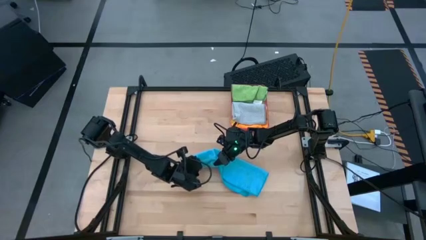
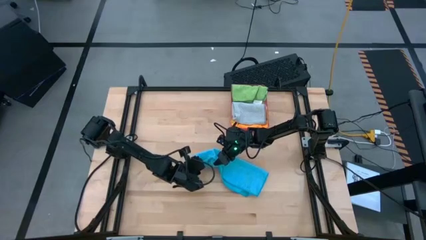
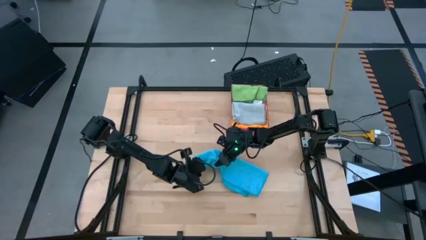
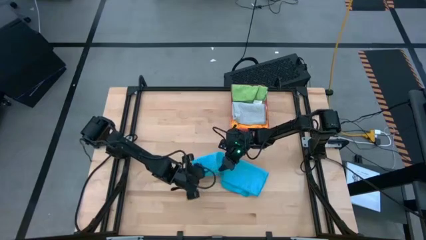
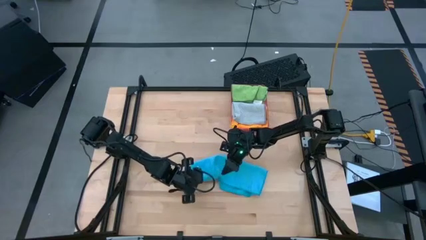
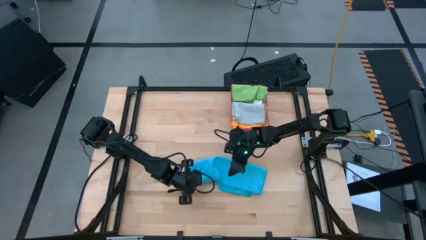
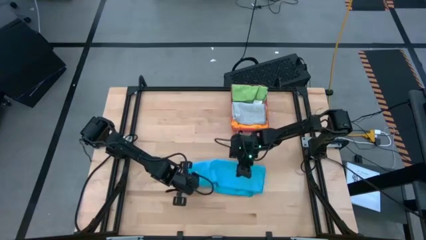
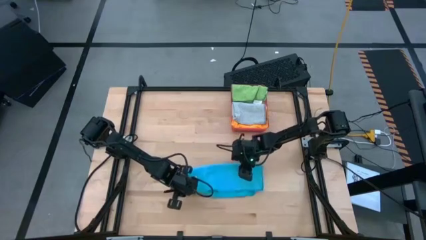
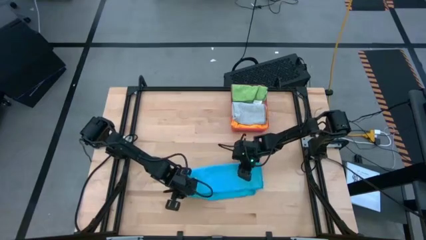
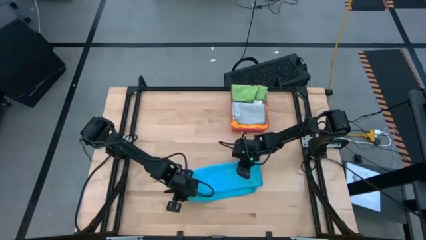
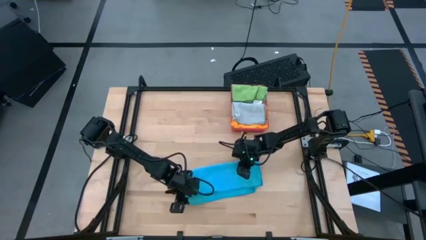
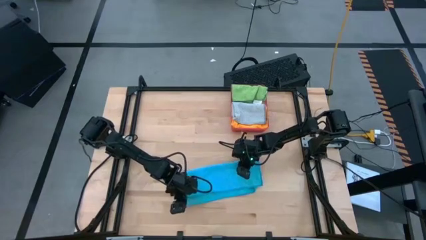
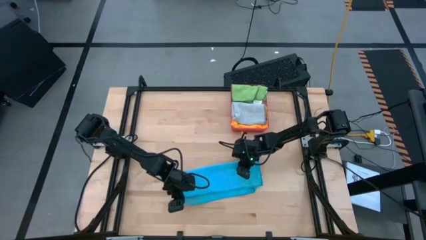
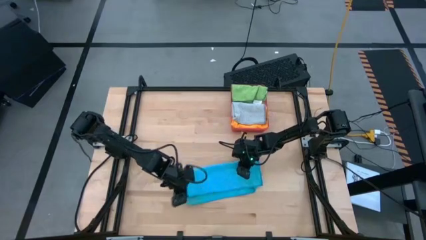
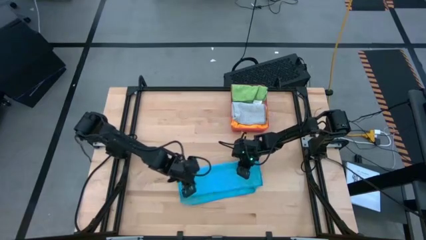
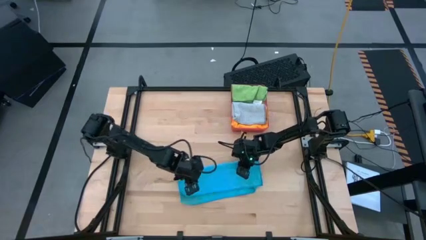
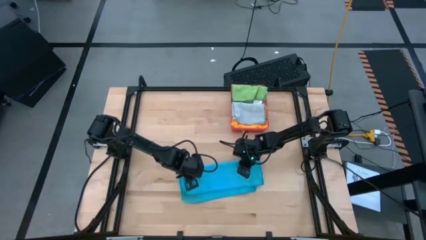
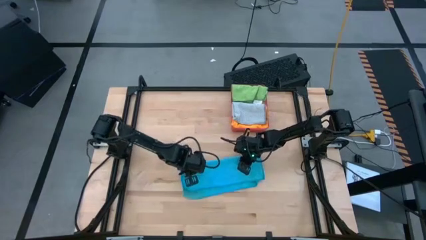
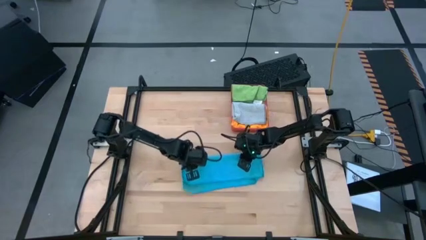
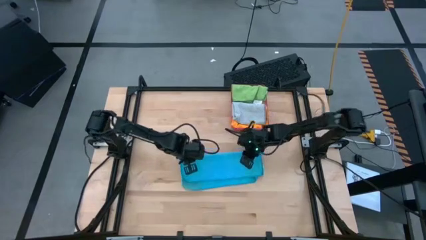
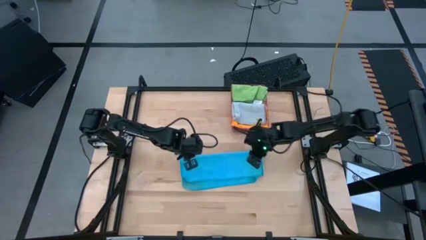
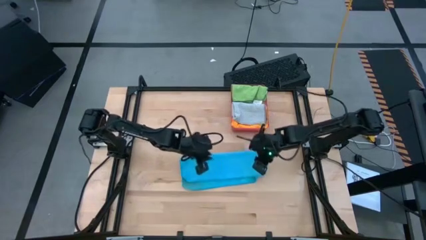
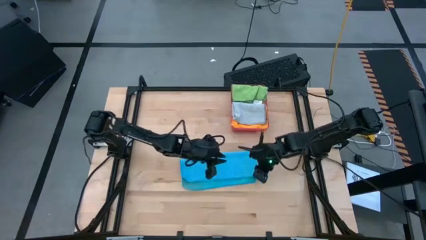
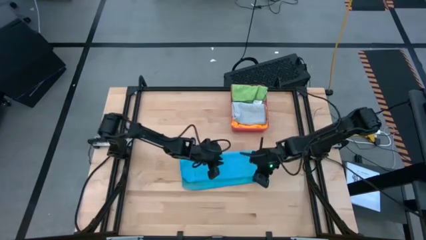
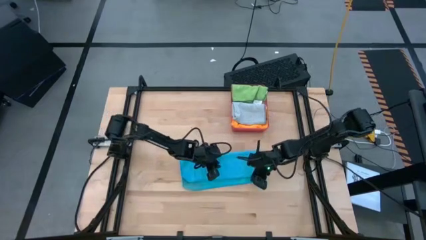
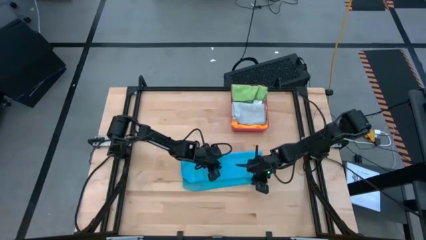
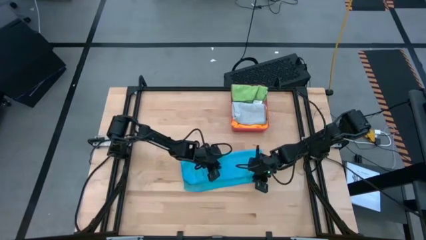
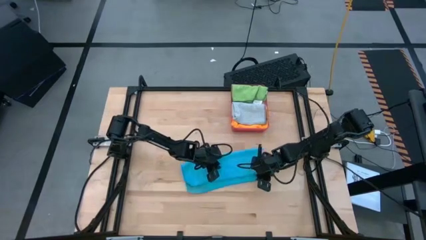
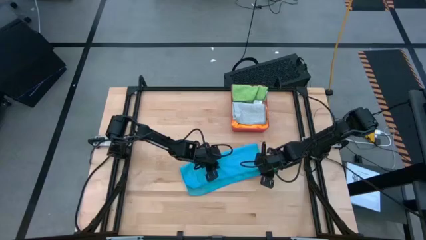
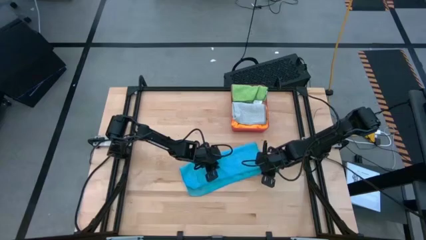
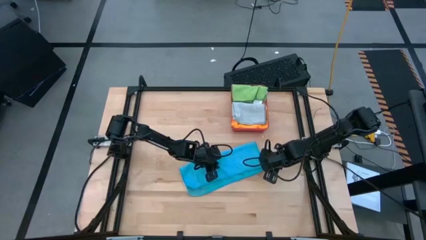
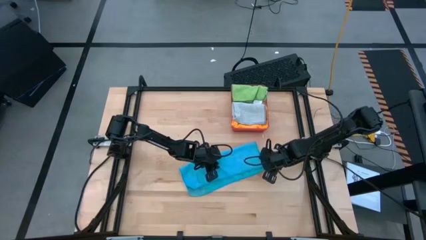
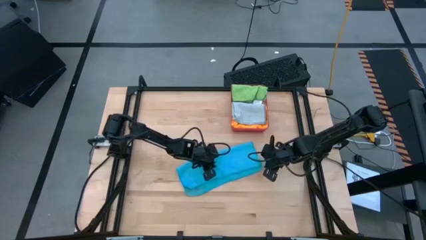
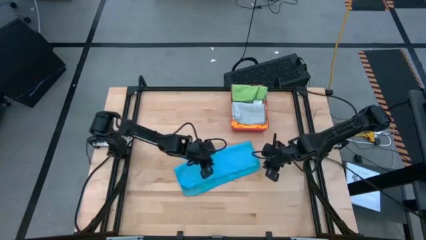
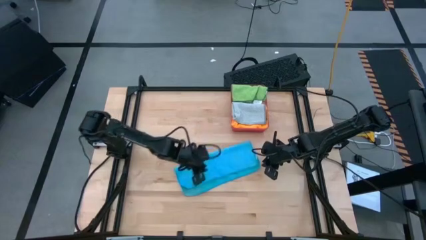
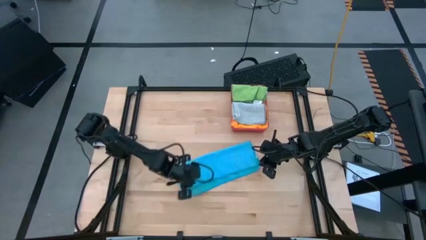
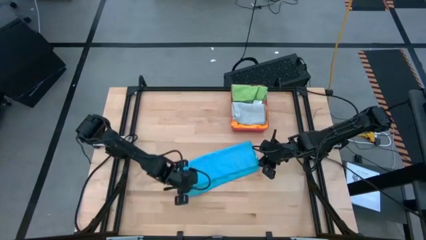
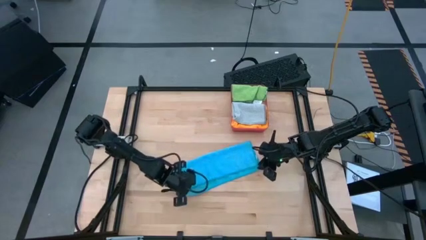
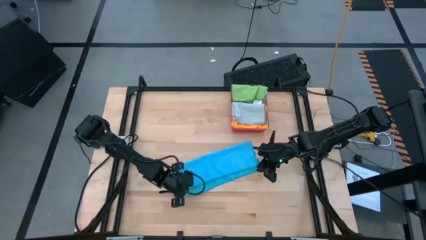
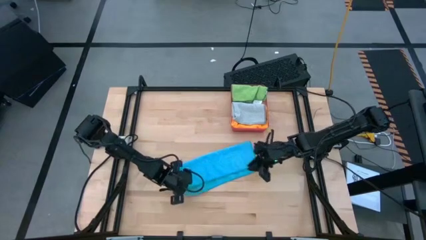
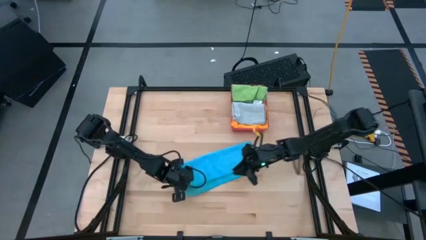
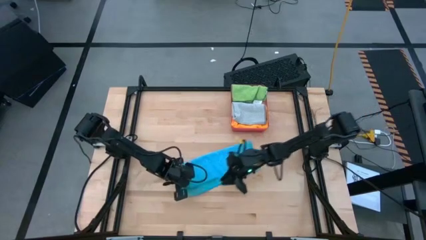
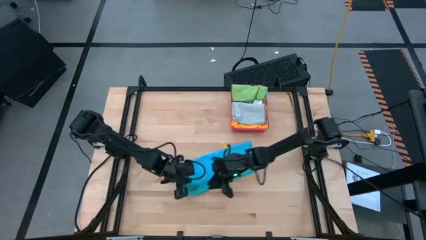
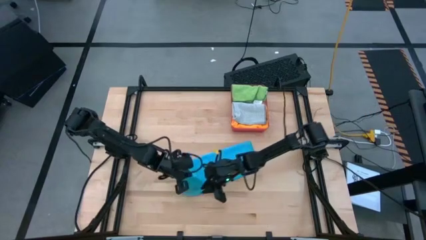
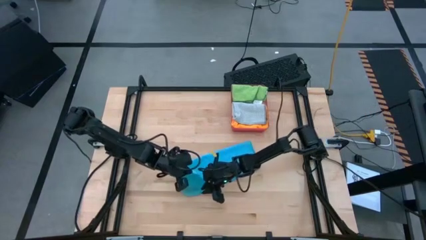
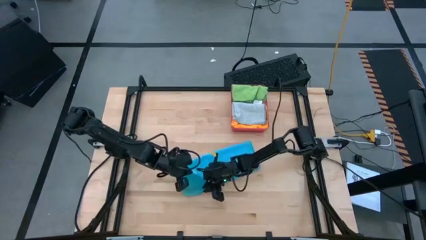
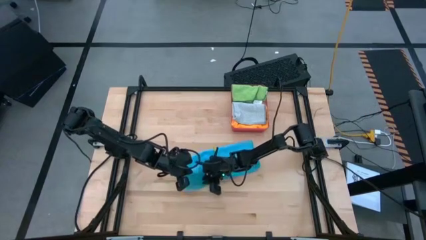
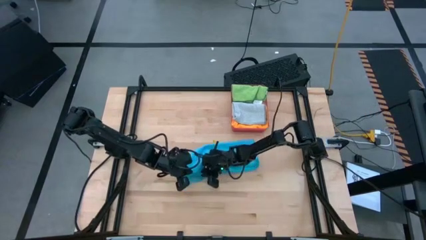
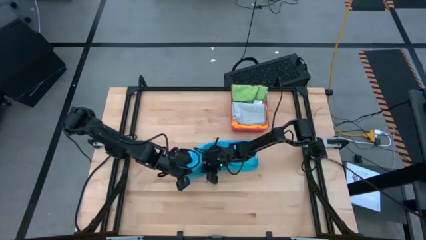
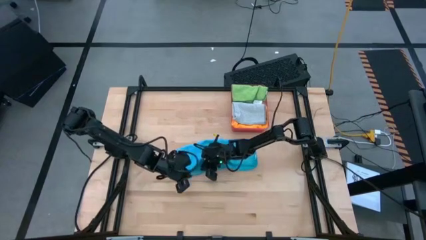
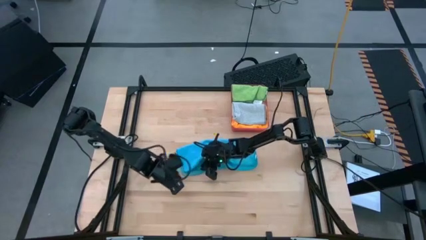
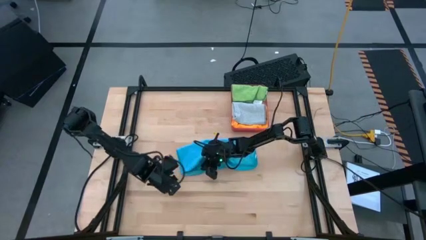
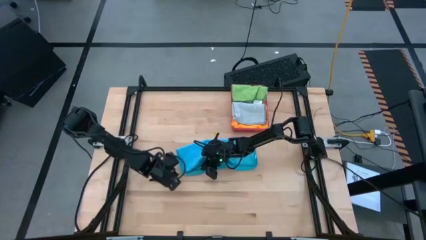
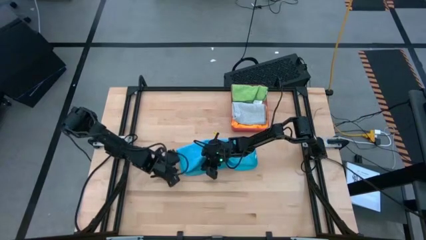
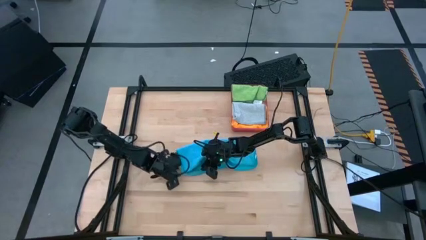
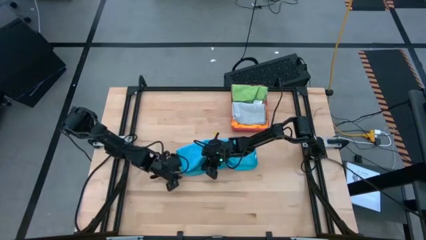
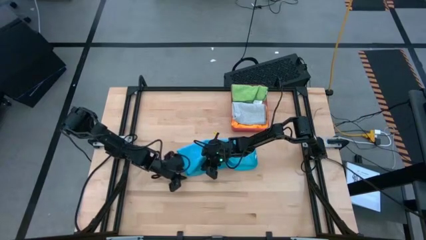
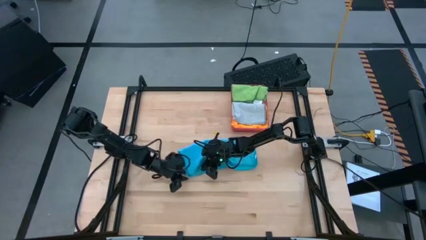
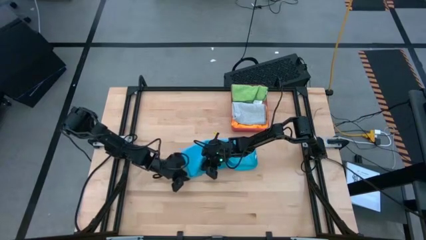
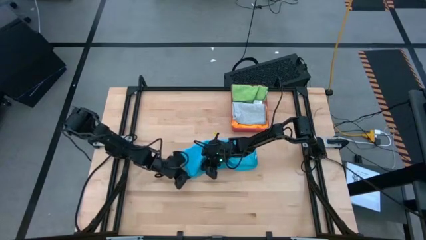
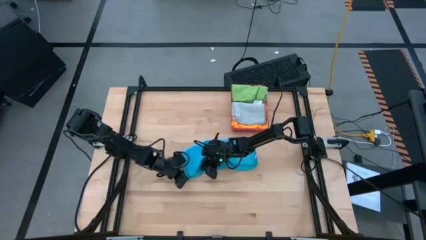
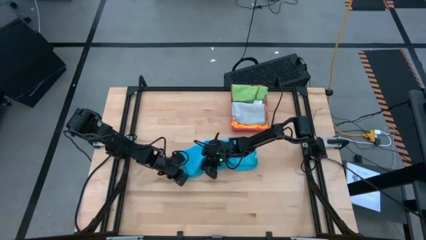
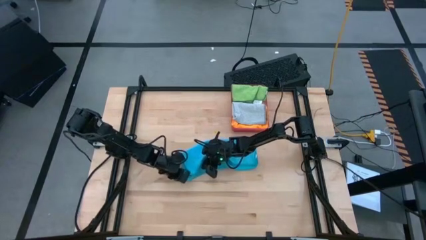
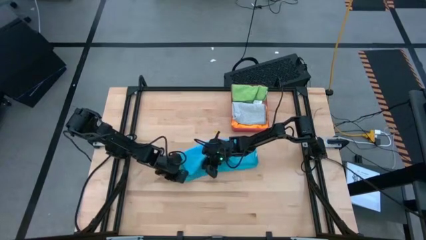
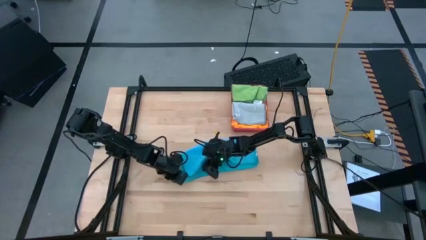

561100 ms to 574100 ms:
Task: Fold microfiber towels
Fold the blue microfiber cloth

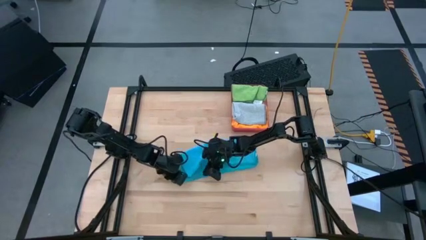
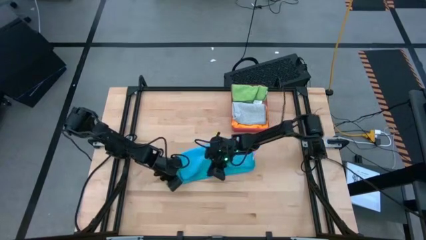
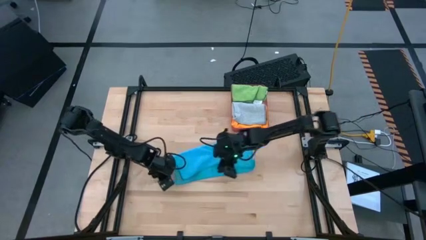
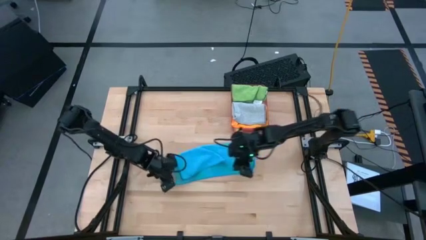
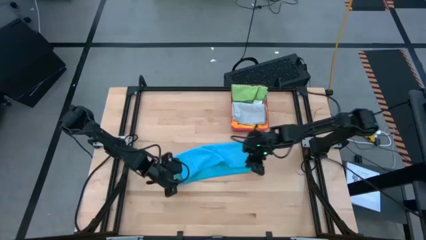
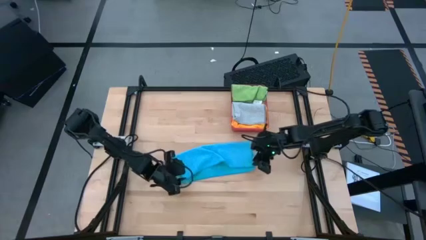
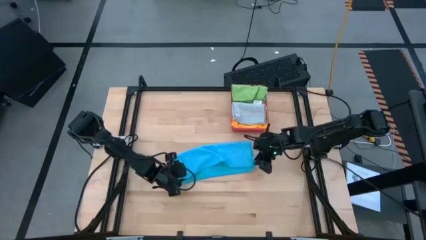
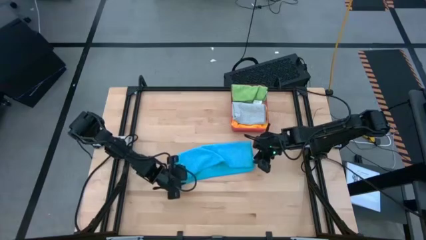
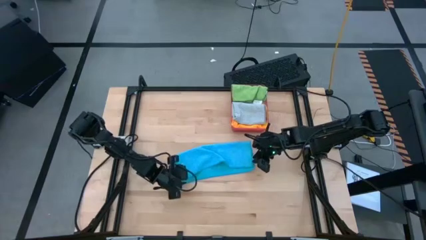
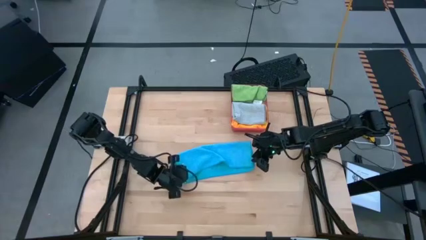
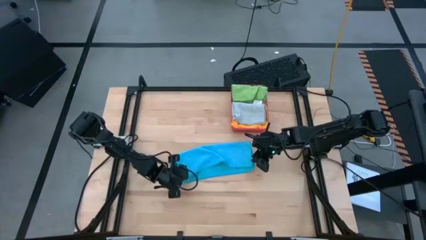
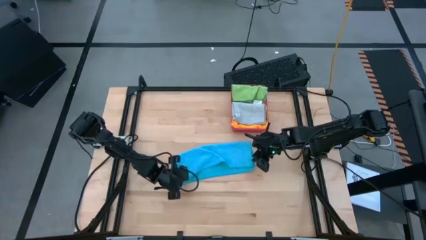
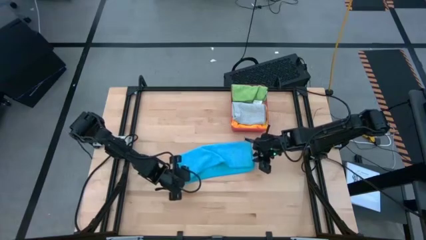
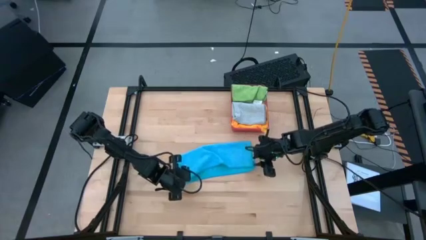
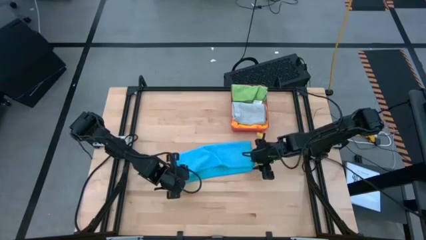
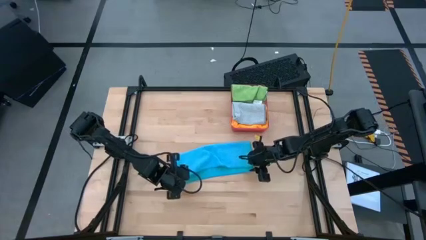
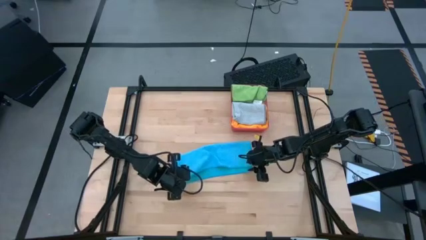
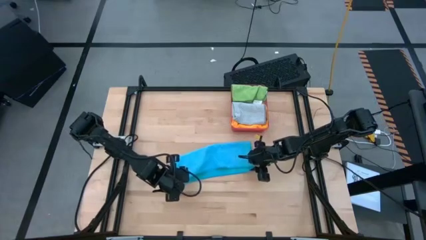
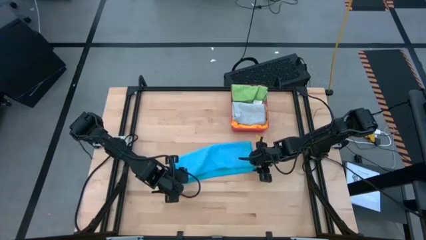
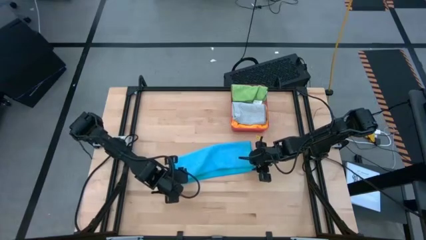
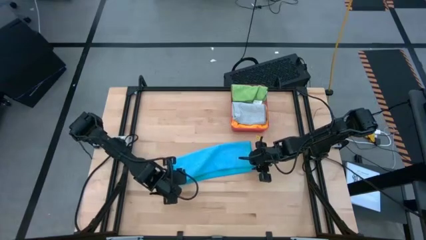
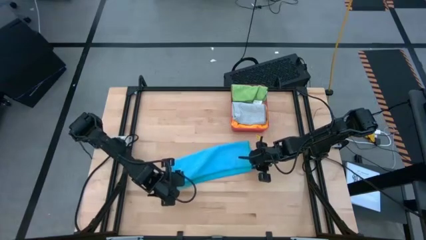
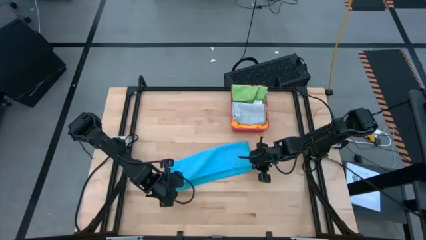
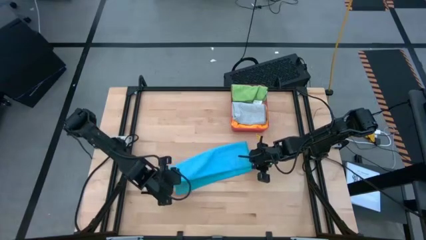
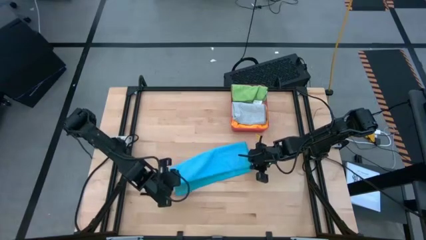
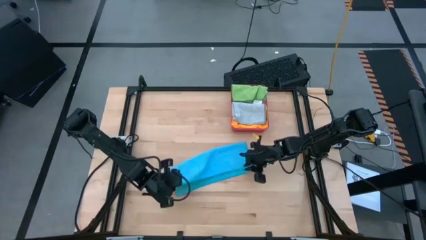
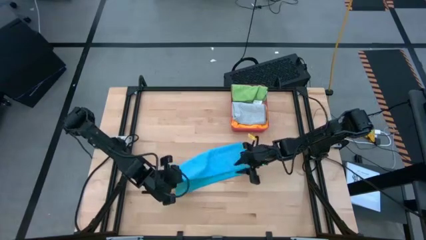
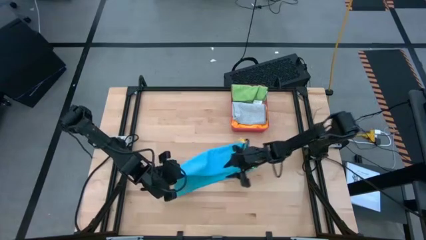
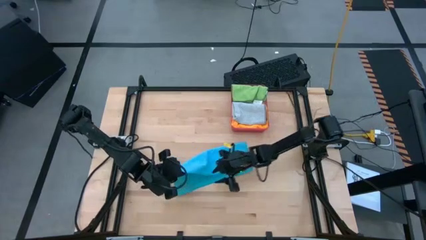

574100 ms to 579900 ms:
Fold the blue microfiber cloth
